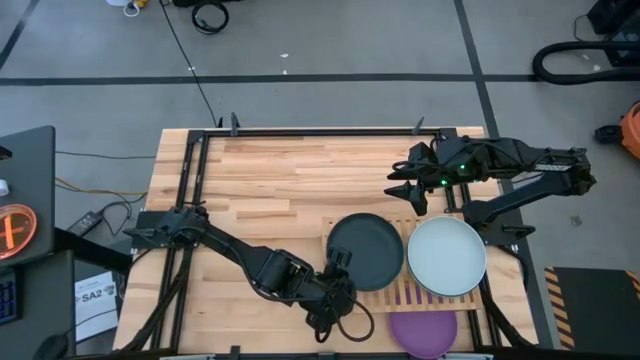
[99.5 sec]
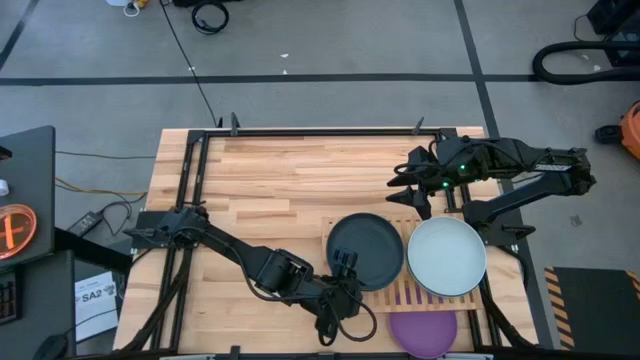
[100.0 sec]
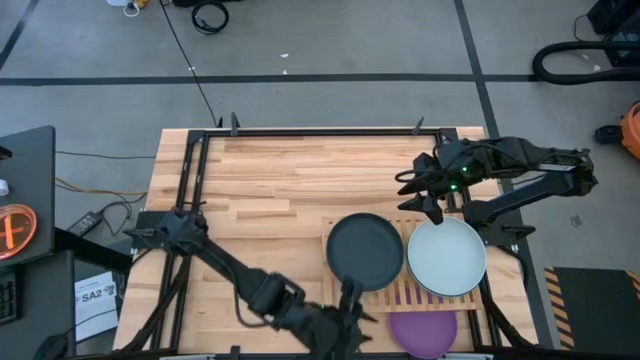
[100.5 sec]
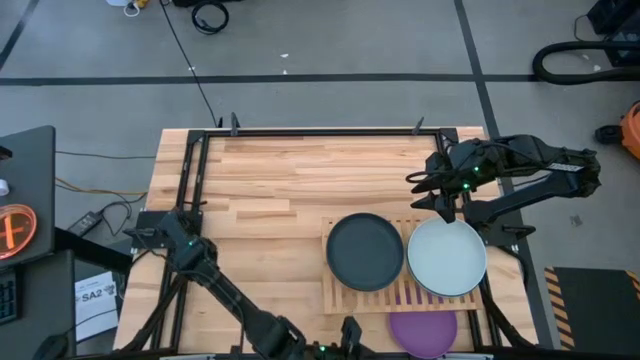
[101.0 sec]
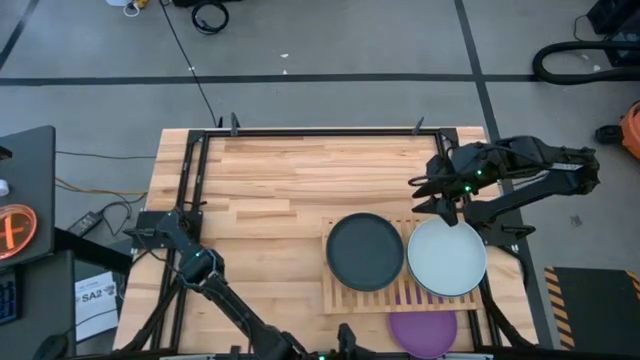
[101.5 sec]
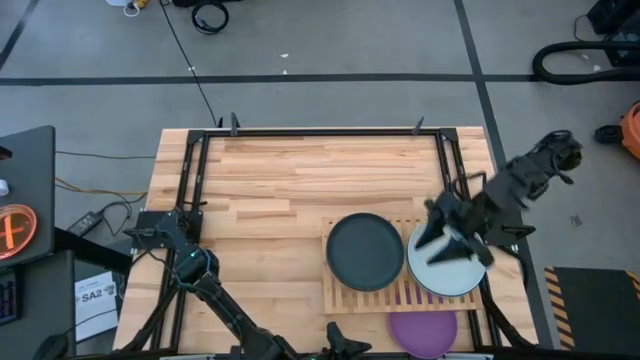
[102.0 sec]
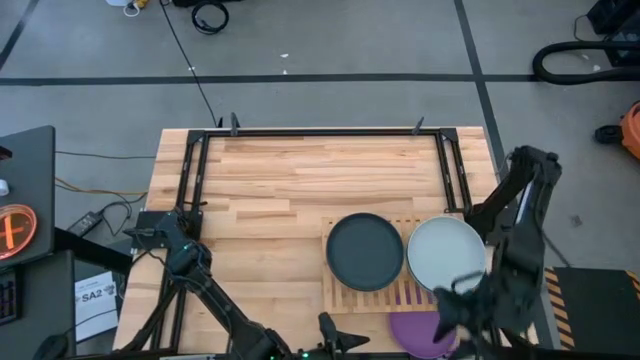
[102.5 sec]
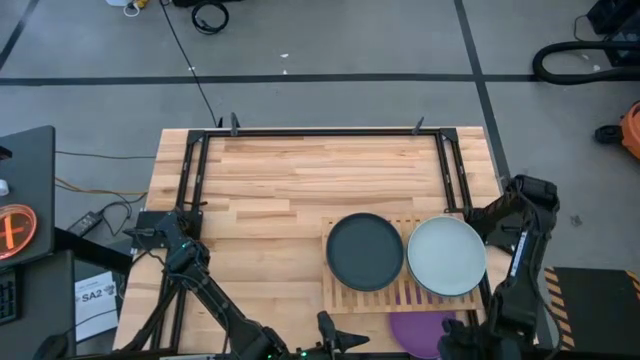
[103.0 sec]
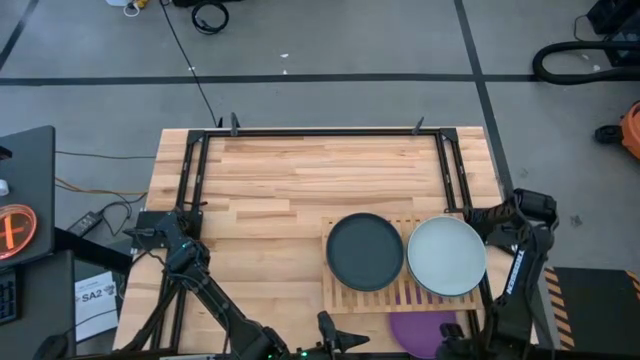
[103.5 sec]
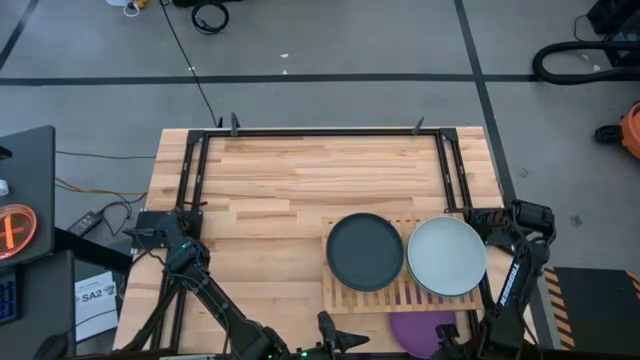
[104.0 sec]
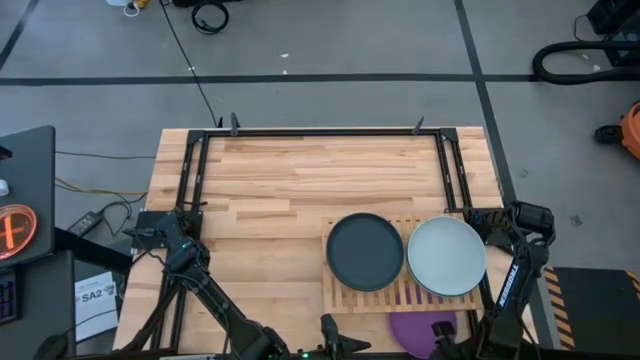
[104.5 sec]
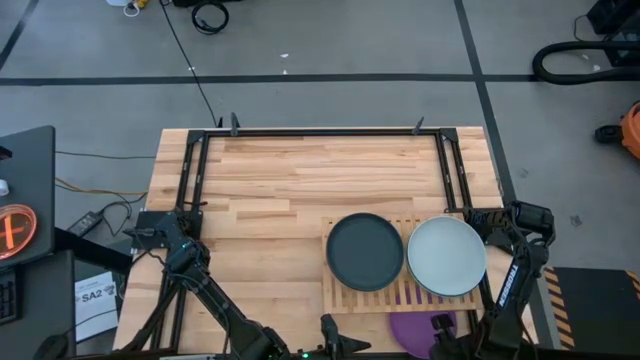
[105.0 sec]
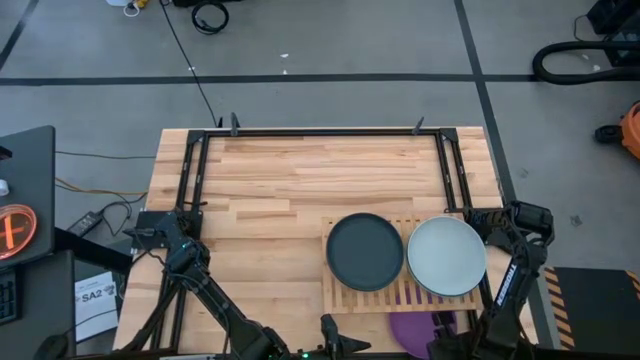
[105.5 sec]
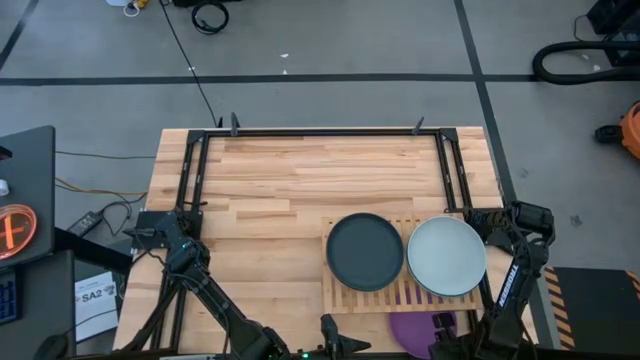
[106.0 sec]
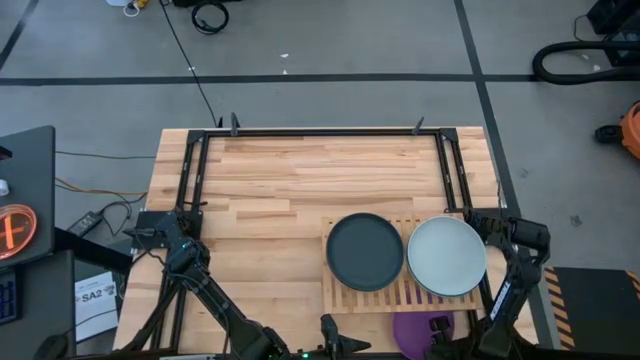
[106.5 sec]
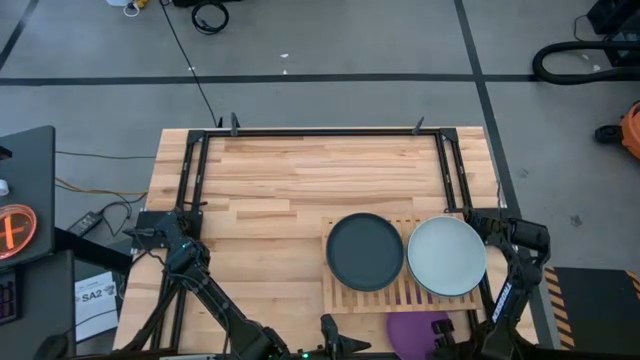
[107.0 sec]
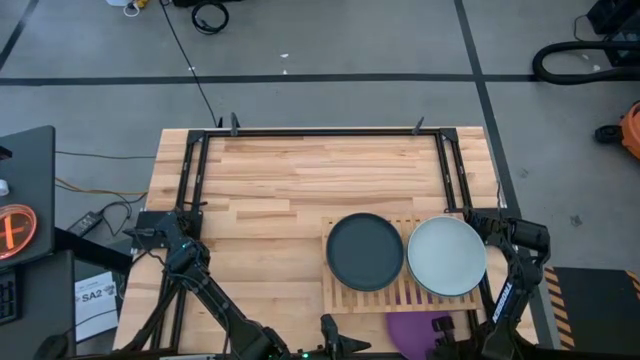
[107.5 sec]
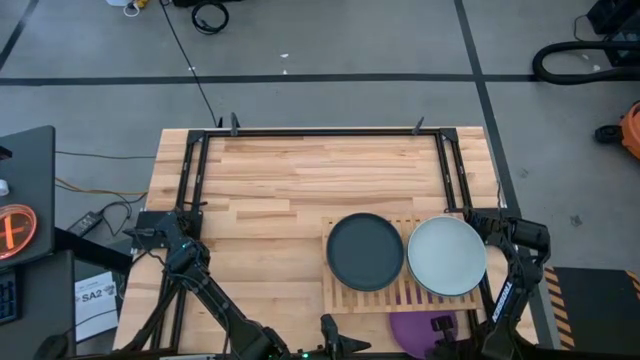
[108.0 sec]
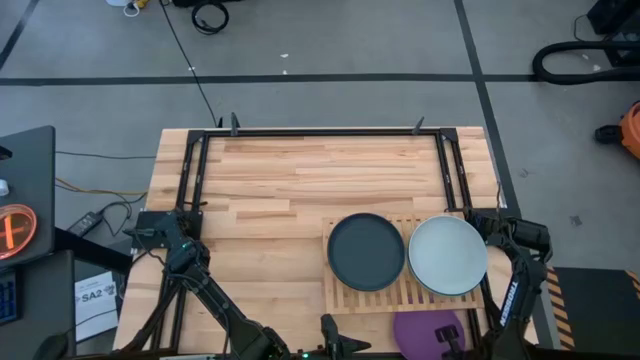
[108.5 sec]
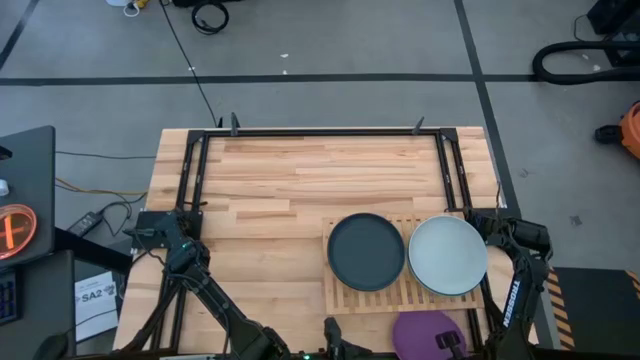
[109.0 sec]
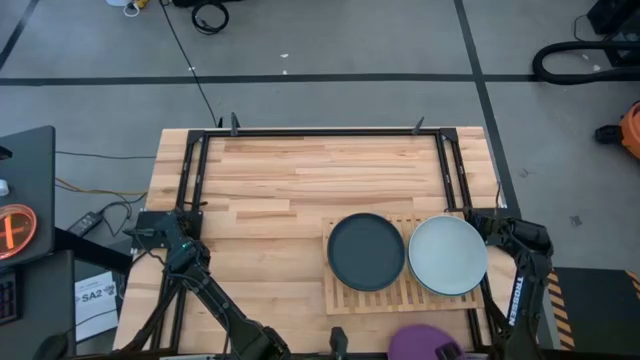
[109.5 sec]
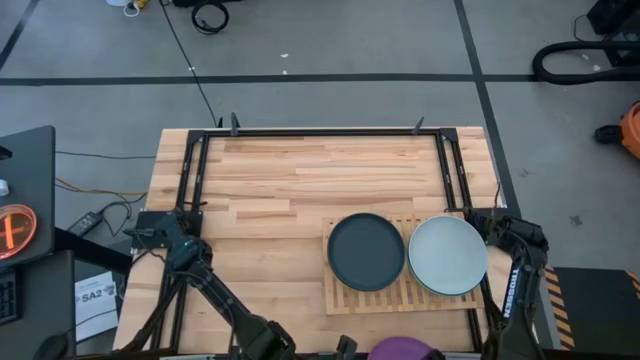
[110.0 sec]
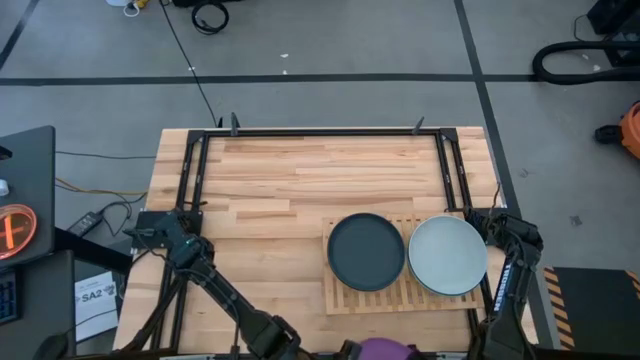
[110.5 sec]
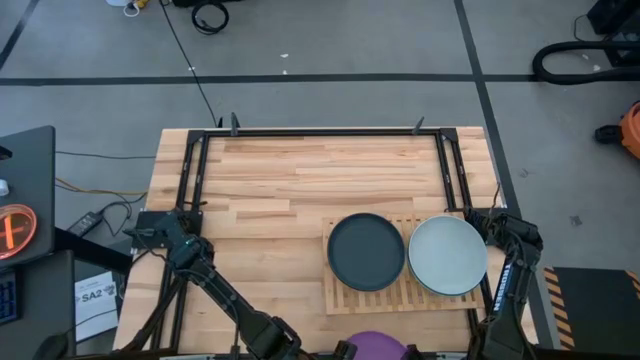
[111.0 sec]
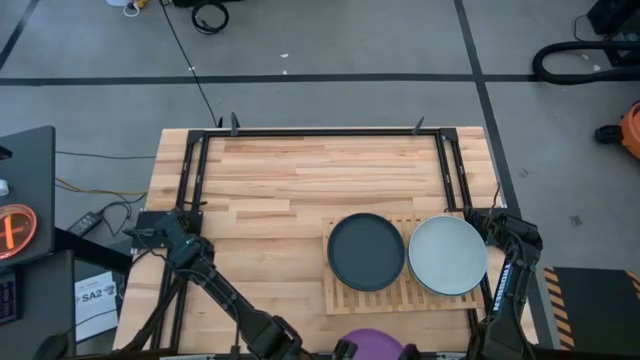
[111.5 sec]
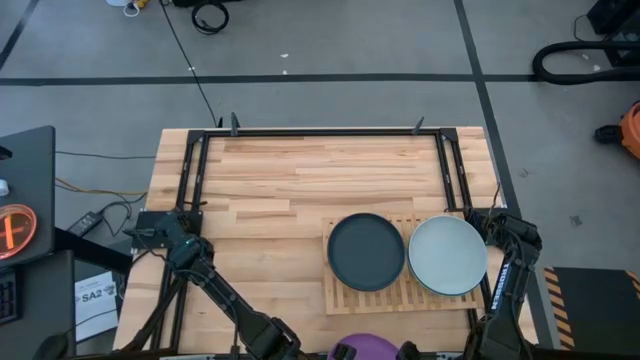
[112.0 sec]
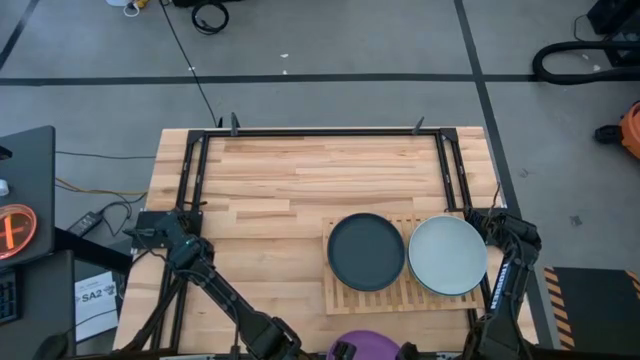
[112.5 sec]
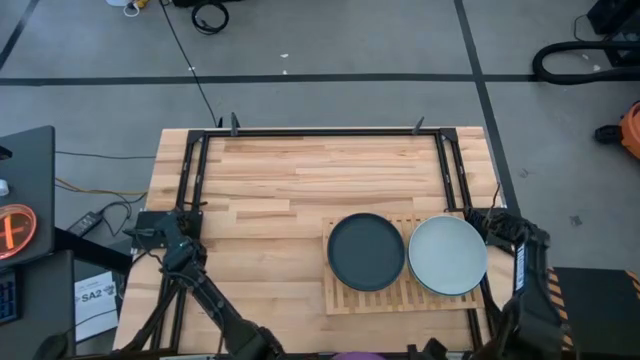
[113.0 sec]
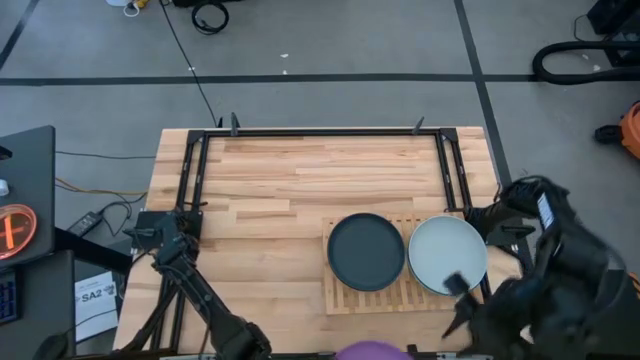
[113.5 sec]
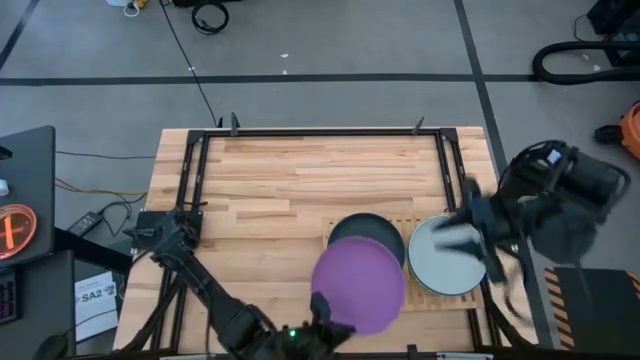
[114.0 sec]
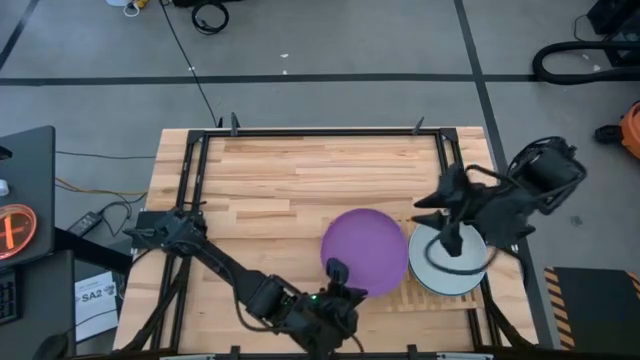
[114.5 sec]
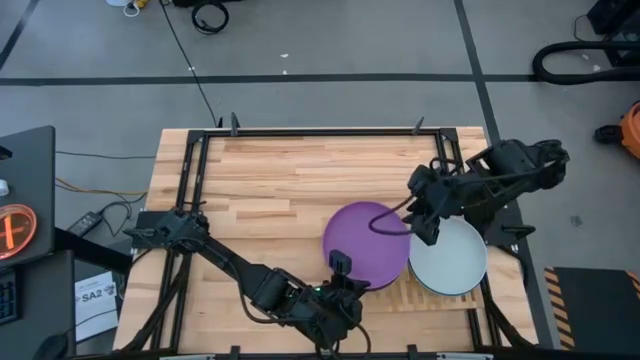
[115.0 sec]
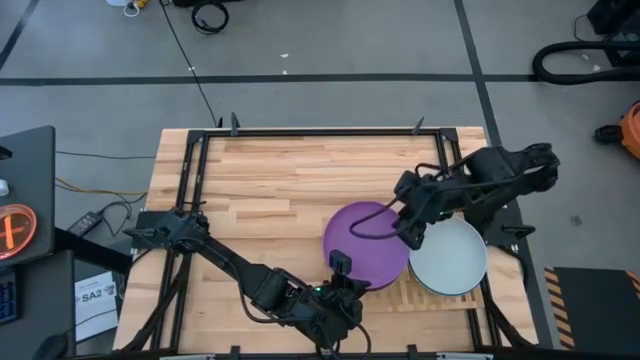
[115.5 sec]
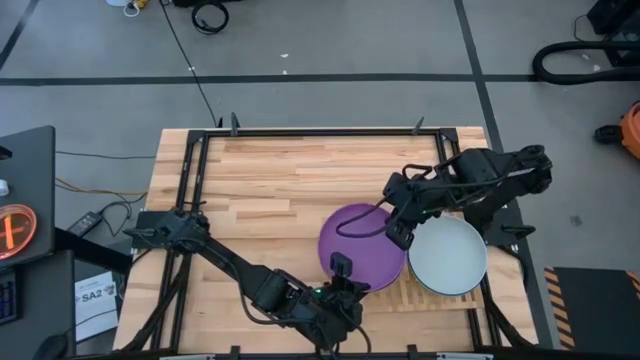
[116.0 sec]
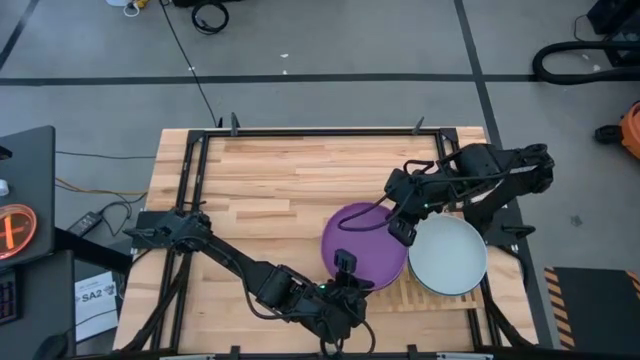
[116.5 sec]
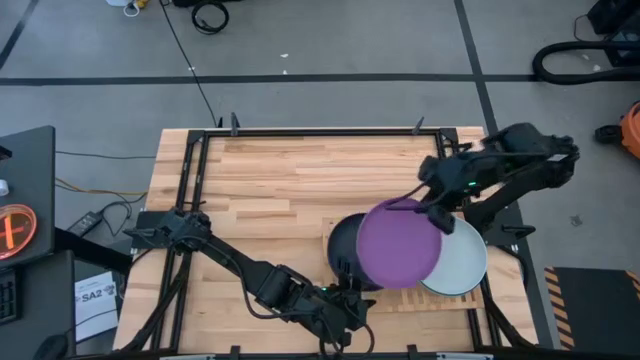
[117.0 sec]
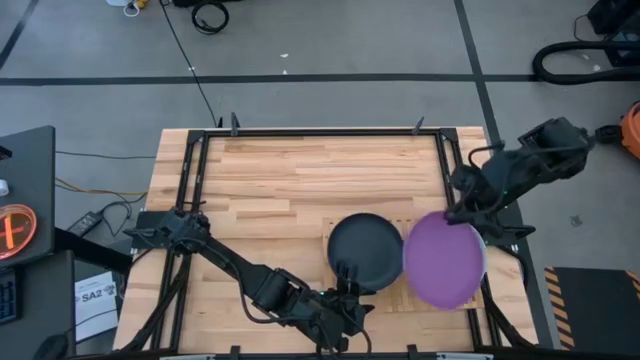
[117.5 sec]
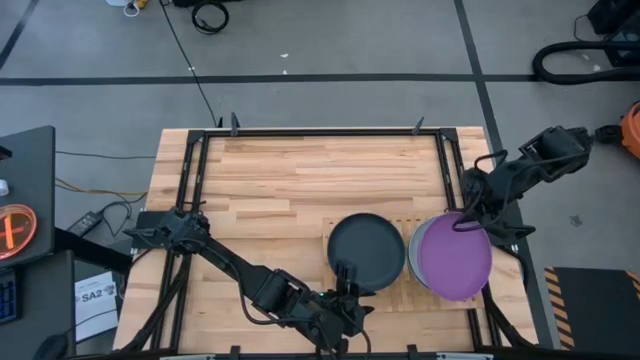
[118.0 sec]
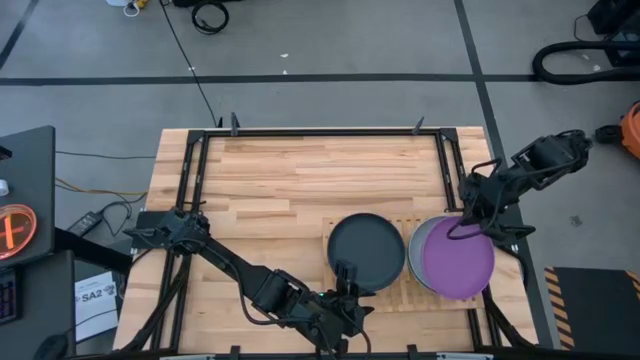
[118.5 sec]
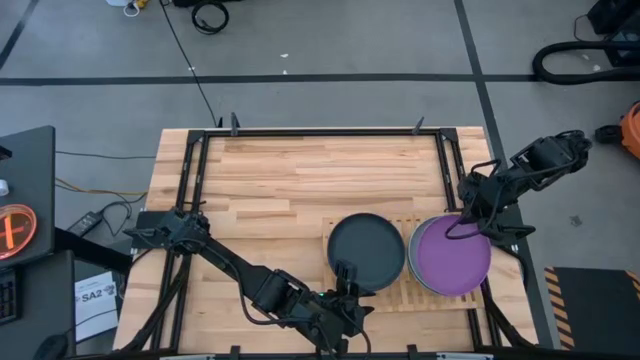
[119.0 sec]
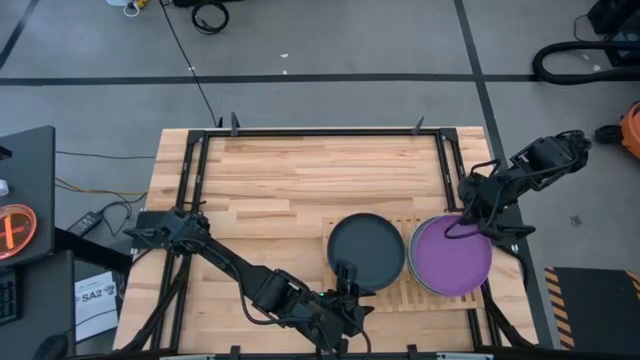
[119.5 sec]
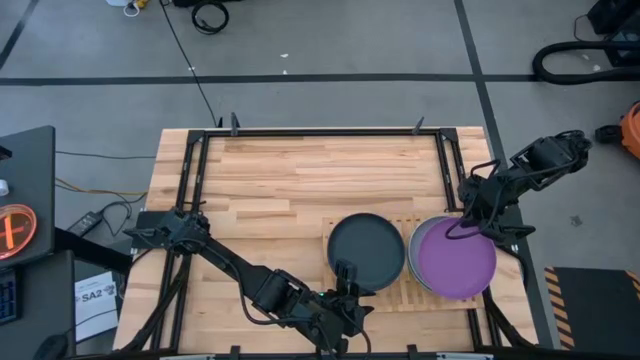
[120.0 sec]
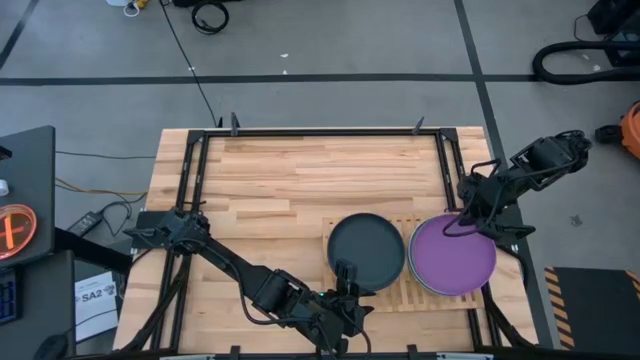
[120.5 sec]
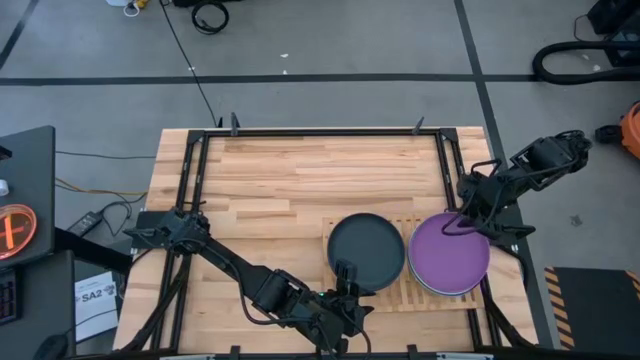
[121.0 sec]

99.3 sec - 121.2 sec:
Task: Place and stack plates onto a shelf
Stack the purple plate on top of the off white plate
